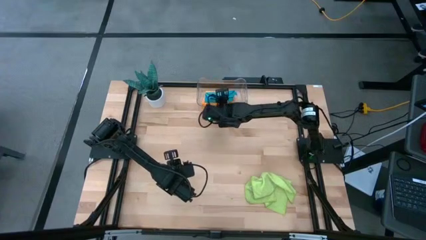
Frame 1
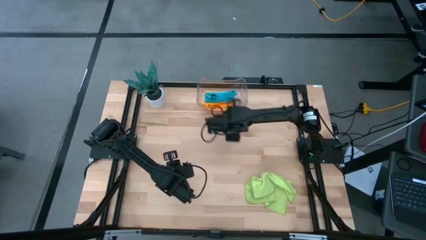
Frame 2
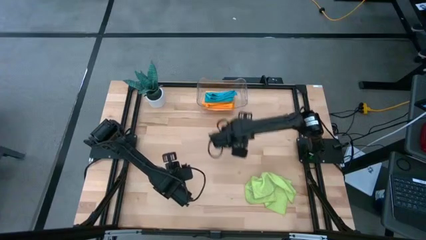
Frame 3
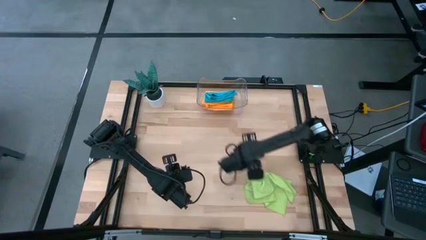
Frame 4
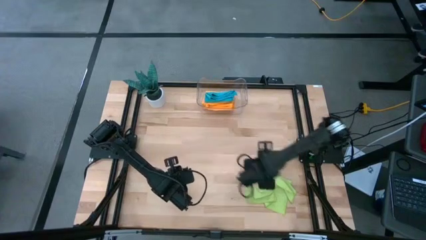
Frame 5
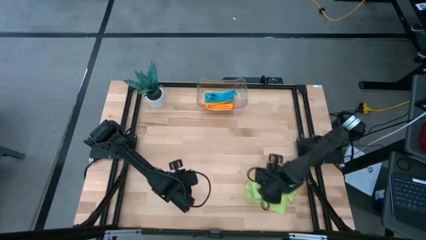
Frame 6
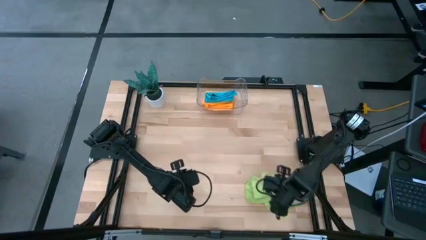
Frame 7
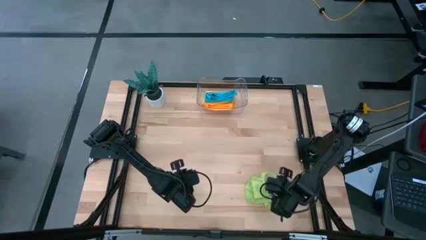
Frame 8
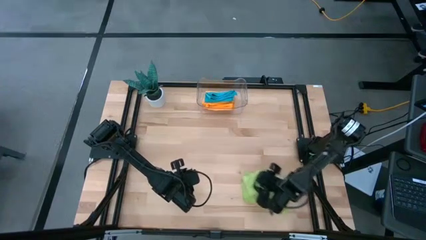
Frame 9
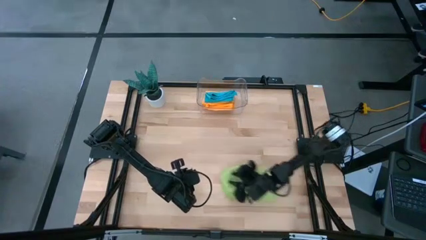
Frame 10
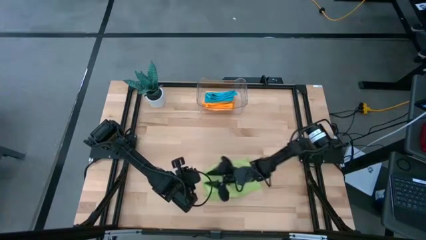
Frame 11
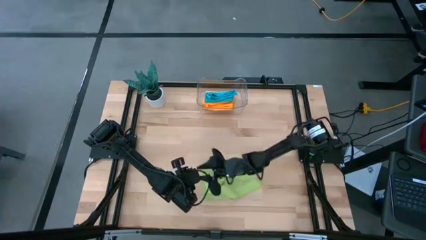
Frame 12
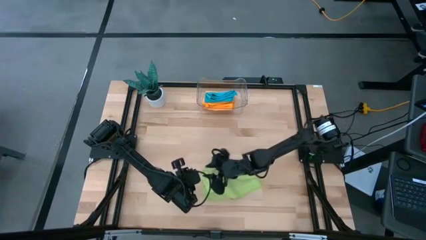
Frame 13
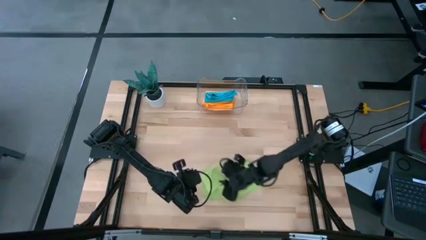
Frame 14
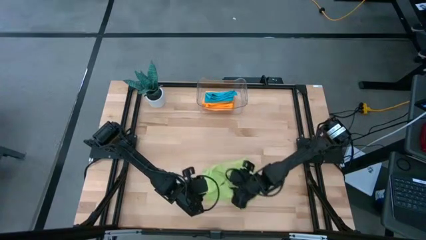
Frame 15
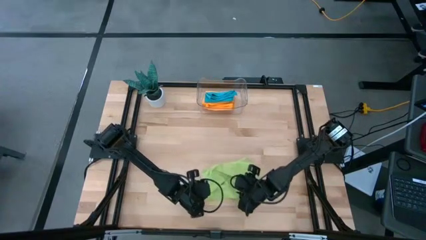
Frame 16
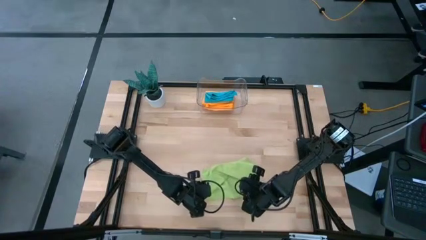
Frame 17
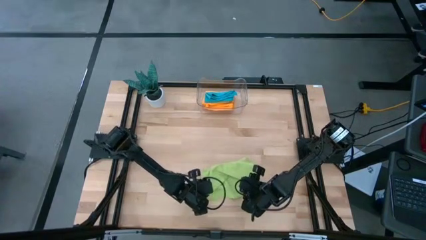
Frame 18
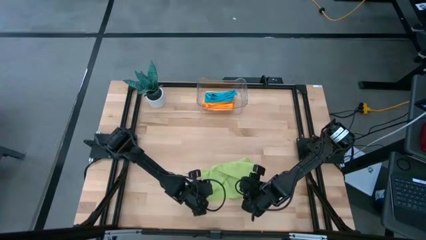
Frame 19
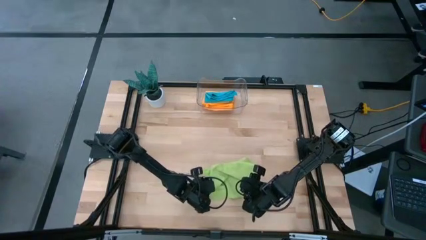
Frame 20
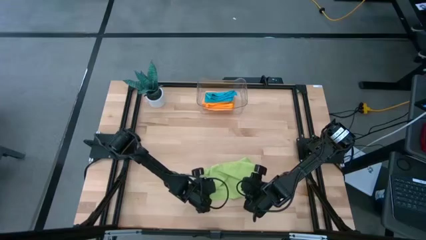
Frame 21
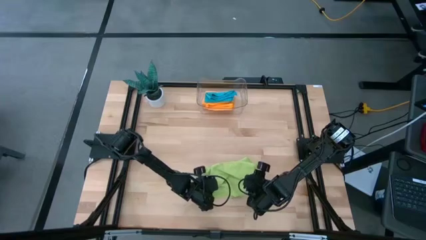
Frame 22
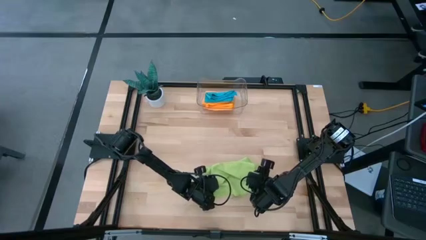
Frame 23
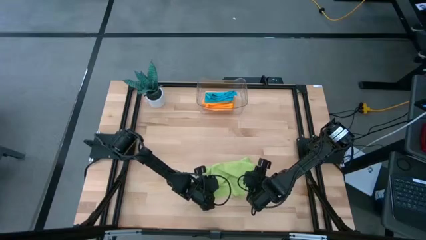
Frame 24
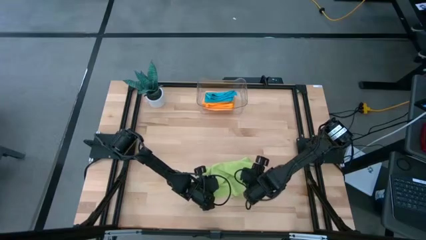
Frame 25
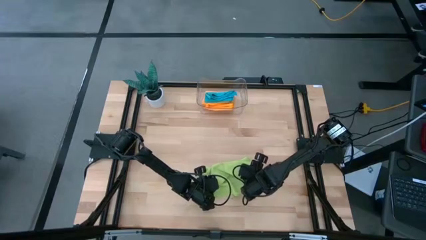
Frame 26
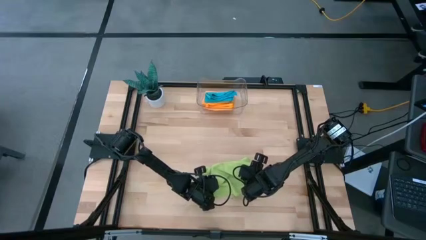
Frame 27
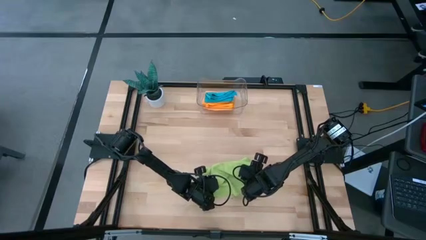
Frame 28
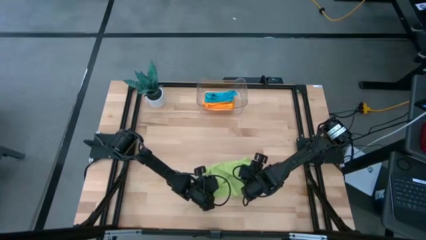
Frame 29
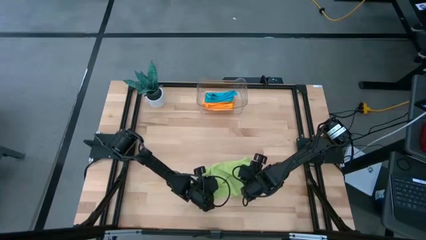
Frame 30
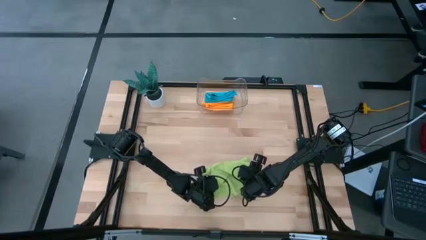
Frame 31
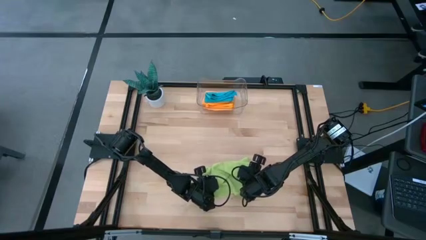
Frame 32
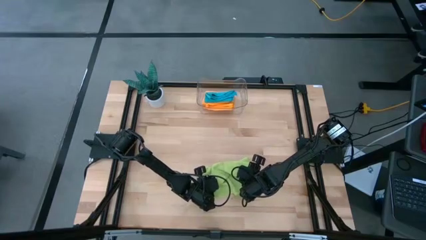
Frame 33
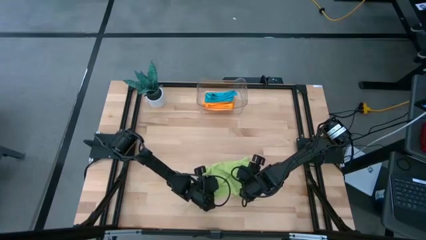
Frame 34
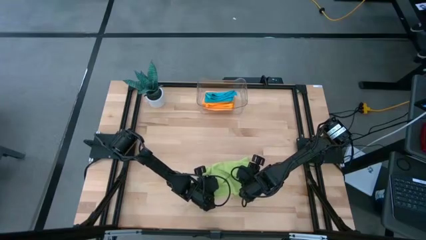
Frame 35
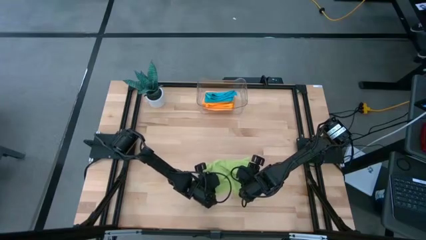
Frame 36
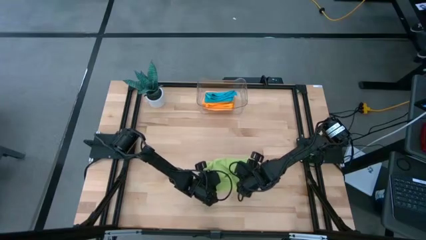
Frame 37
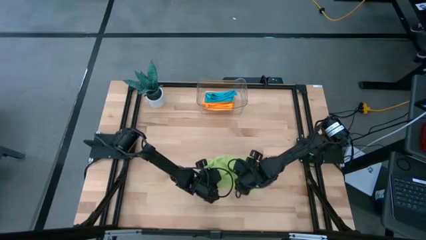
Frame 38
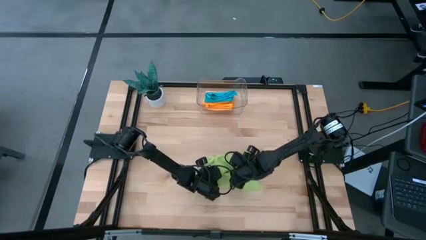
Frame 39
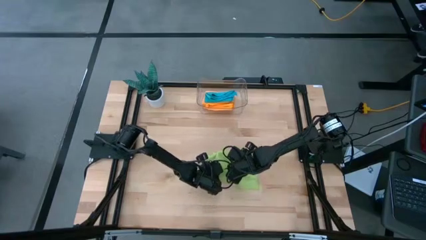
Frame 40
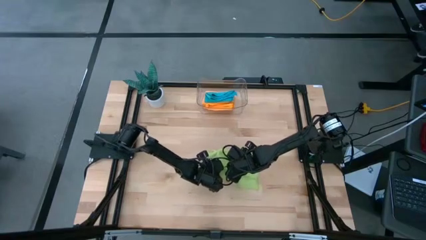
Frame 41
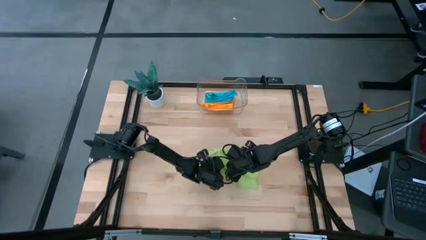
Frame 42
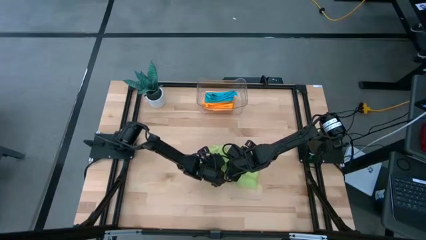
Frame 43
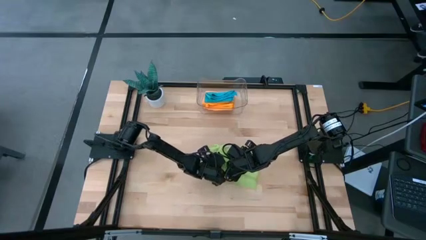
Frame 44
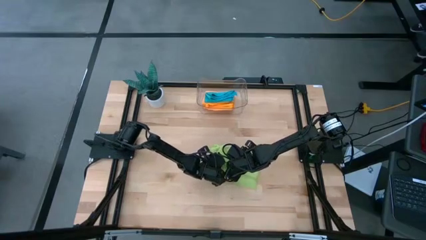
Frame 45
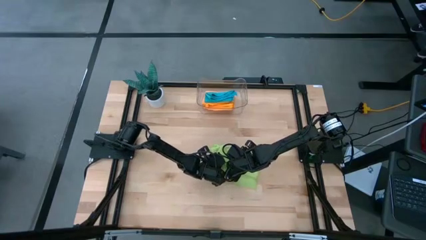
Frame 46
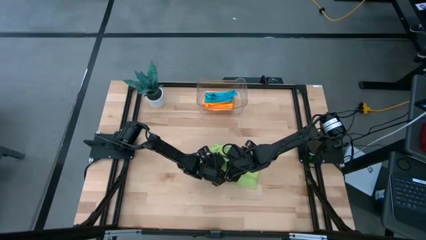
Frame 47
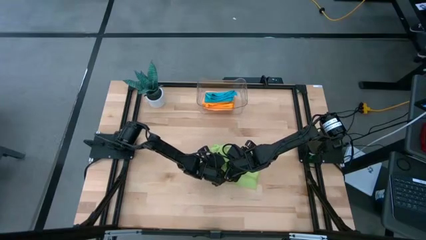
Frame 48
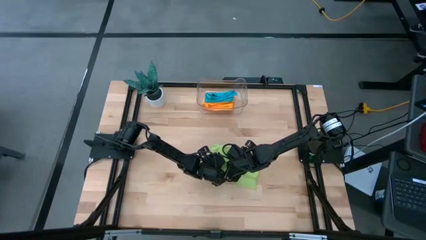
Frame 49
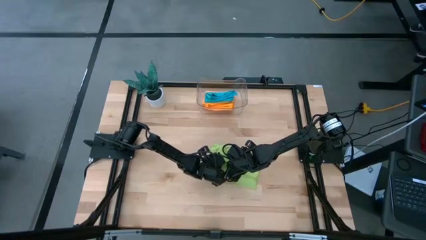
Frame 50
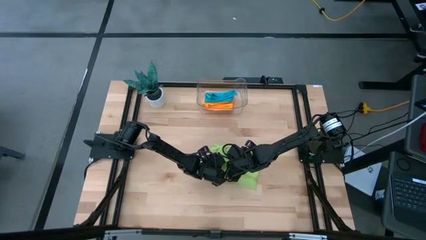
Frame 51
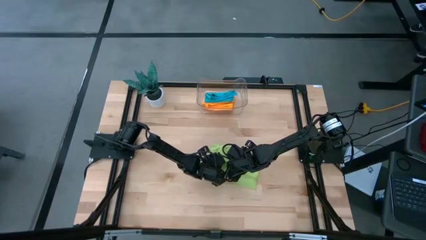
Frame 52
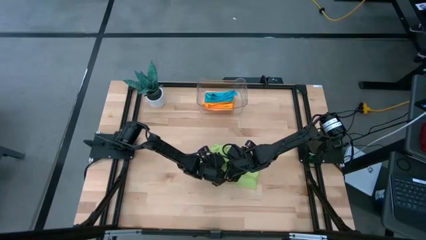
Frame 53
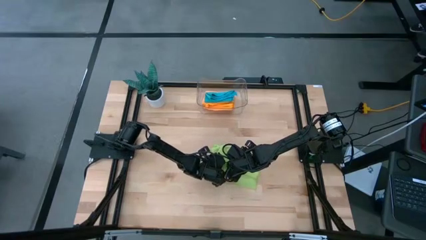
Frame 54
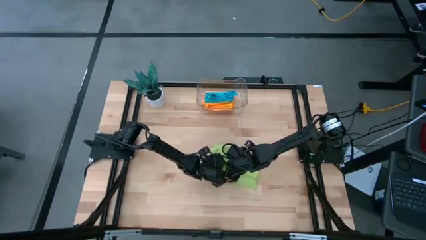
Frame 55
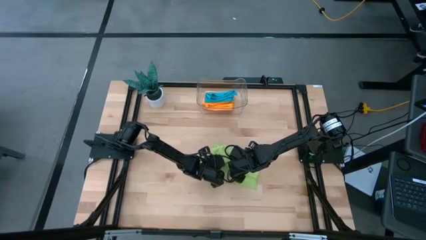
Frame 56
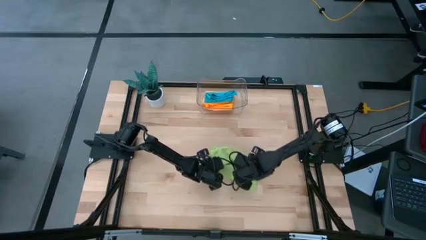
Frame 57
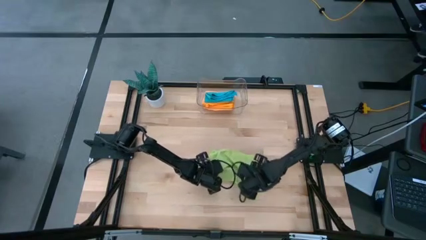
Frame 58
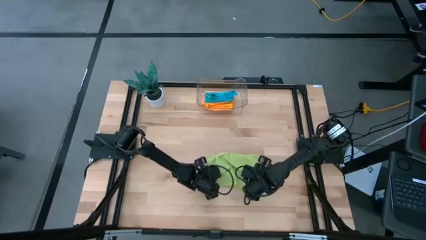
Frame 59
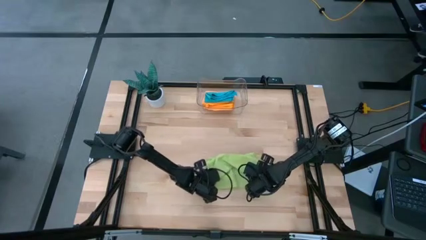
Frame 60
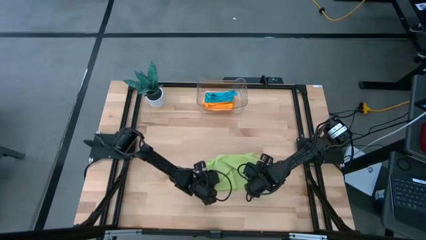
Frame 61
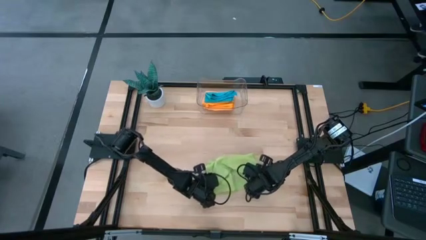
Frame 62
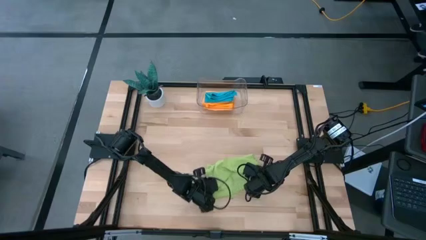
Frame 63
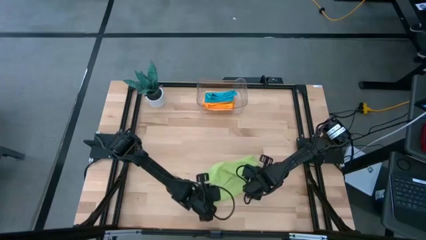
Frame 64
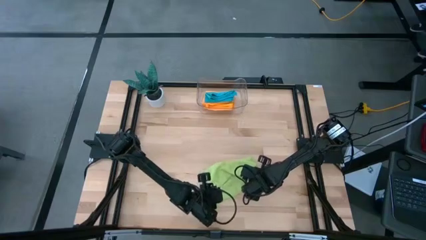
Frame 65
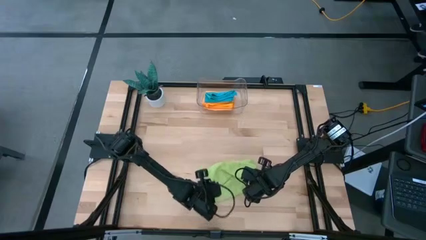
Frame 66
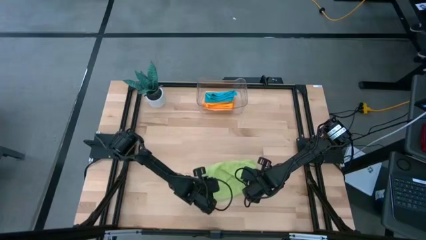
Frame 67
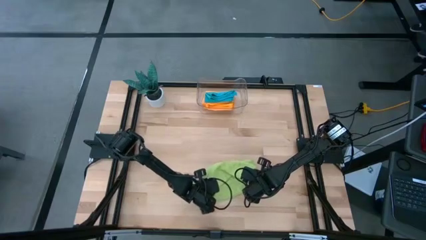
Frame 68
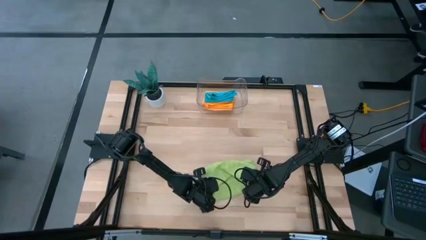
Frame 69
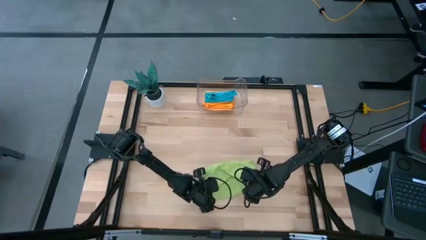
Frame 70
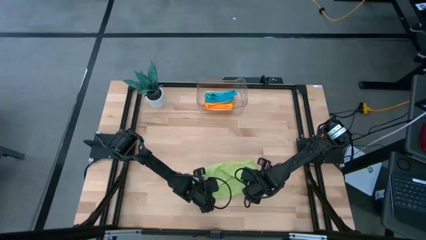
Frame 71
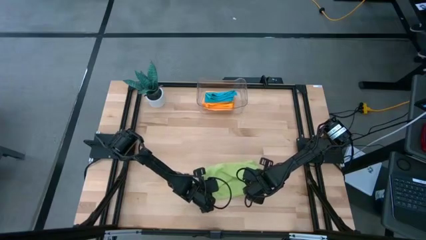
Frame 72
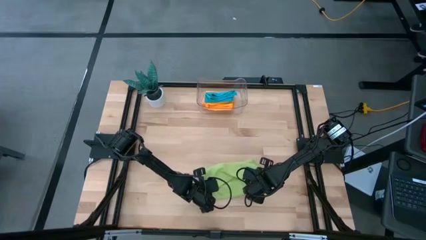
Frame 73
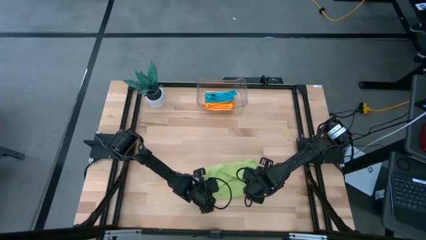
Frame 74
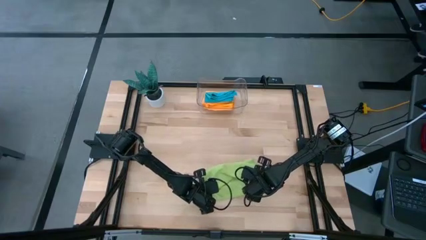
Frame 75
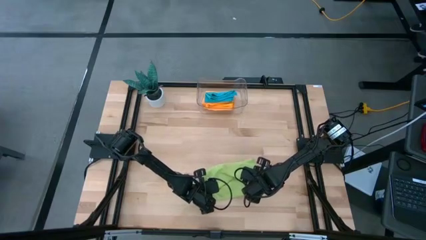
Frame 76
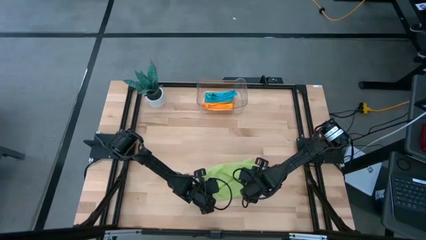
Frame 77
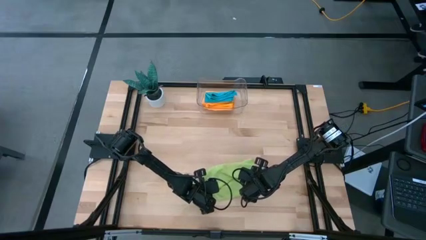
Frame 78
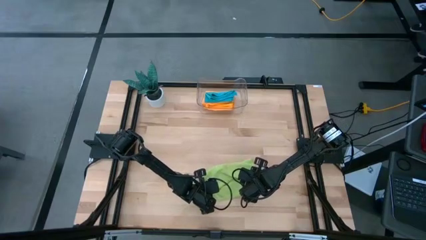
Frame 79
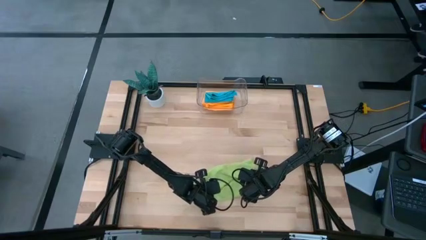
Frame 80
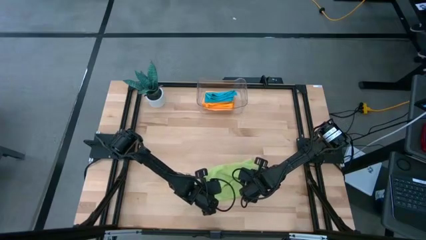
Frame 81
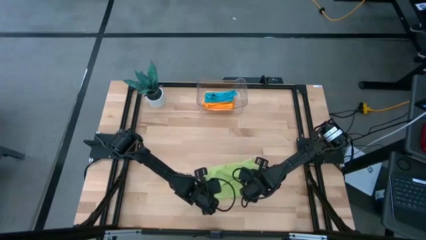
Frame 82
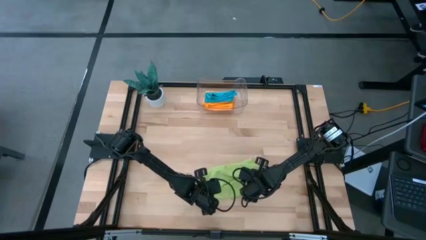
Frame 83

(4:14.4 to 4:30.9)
Task: Fold microfiber towels
Fold the green microfiber cloth
